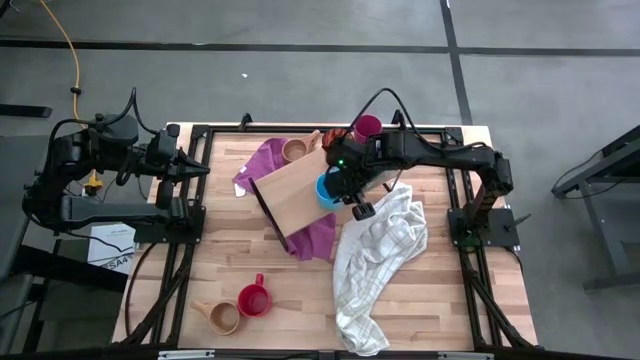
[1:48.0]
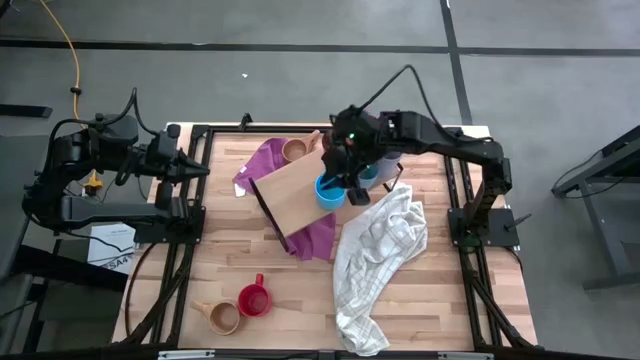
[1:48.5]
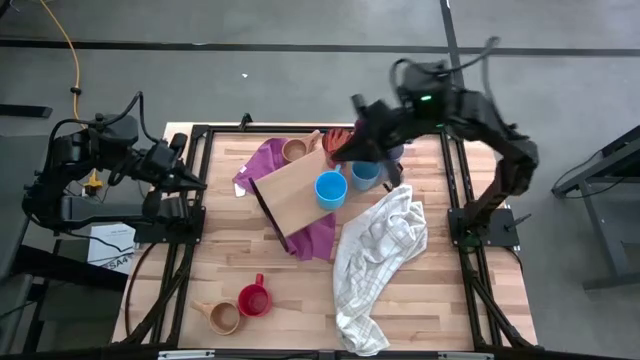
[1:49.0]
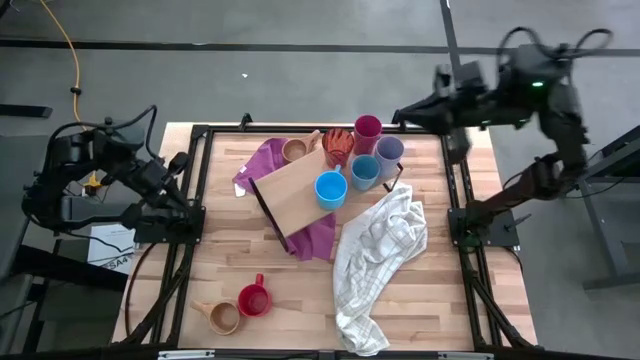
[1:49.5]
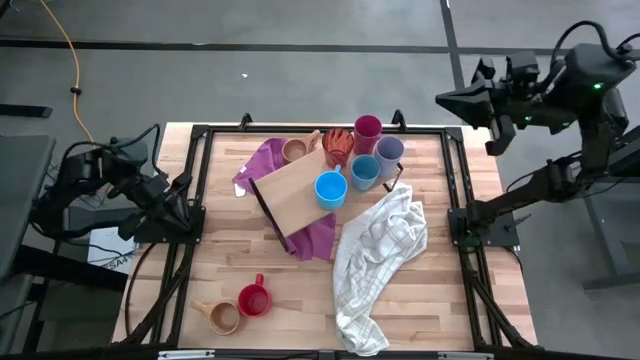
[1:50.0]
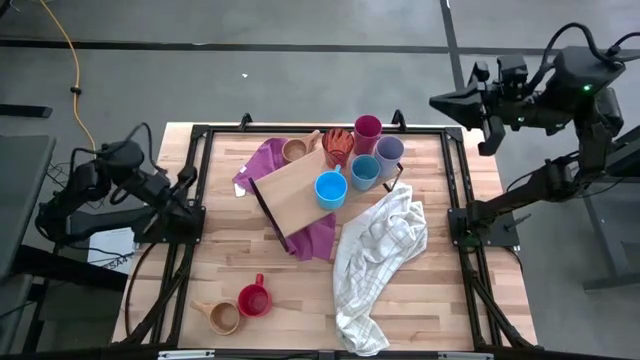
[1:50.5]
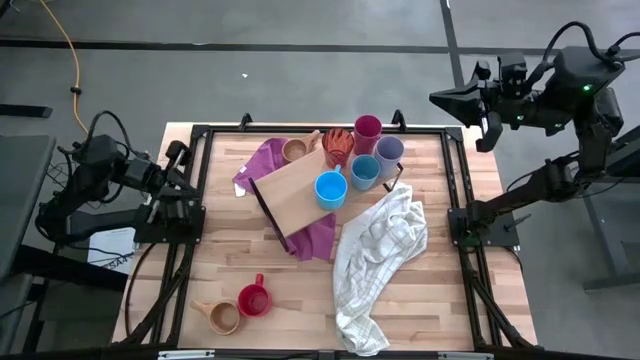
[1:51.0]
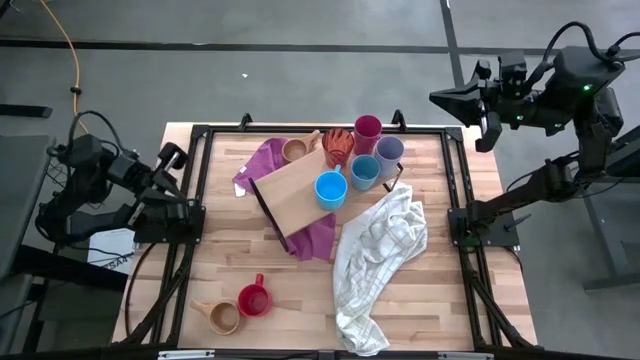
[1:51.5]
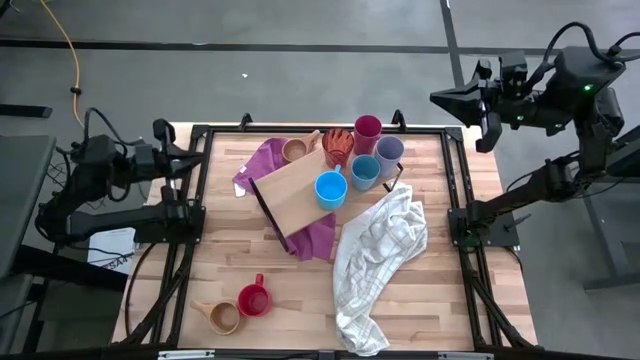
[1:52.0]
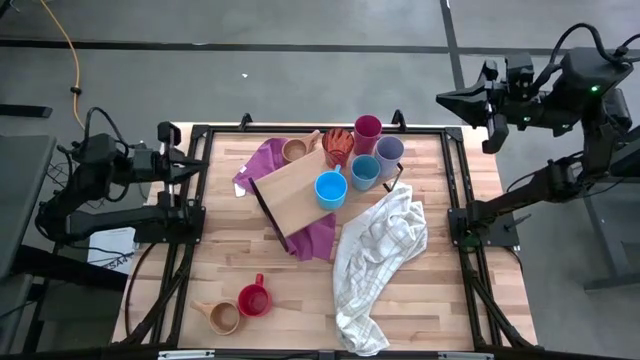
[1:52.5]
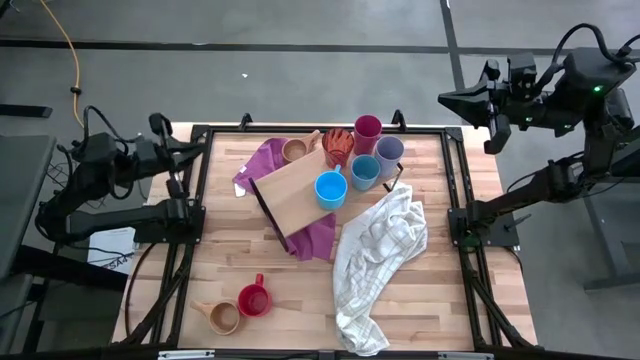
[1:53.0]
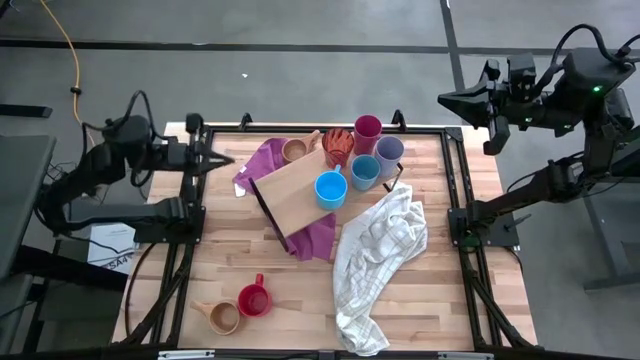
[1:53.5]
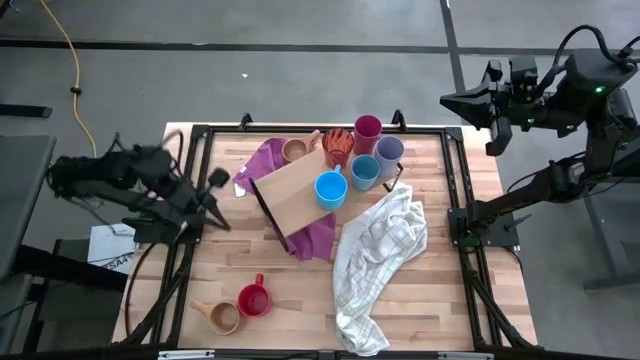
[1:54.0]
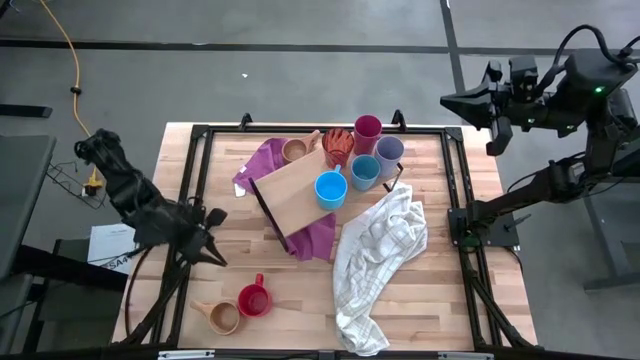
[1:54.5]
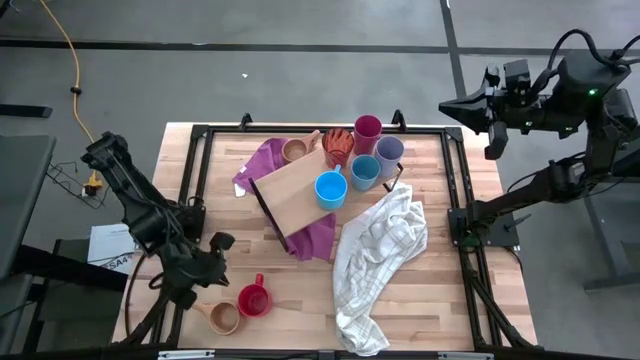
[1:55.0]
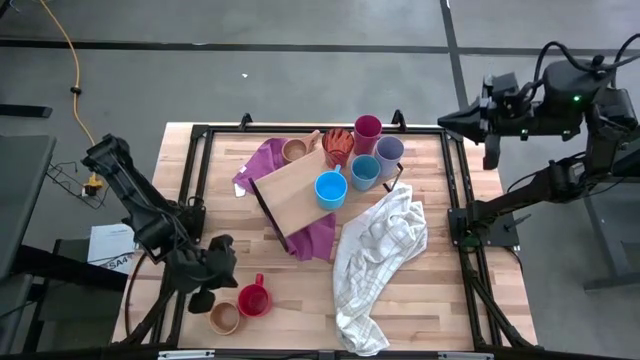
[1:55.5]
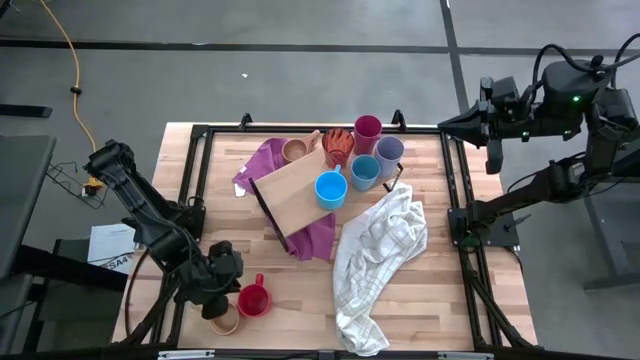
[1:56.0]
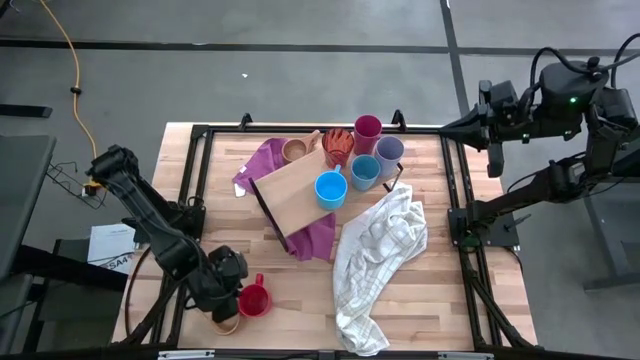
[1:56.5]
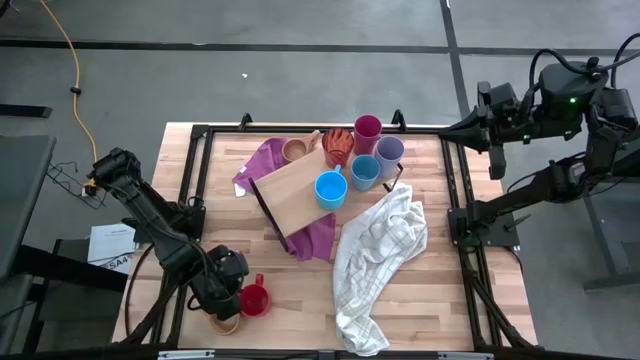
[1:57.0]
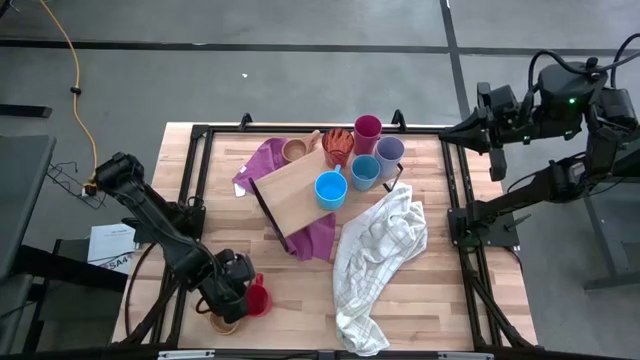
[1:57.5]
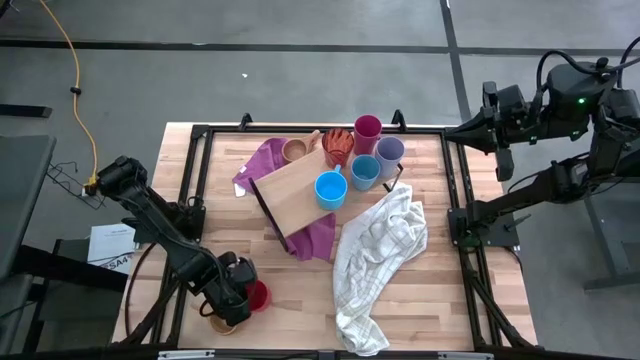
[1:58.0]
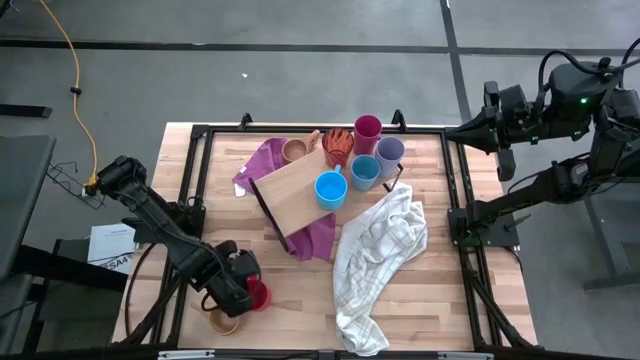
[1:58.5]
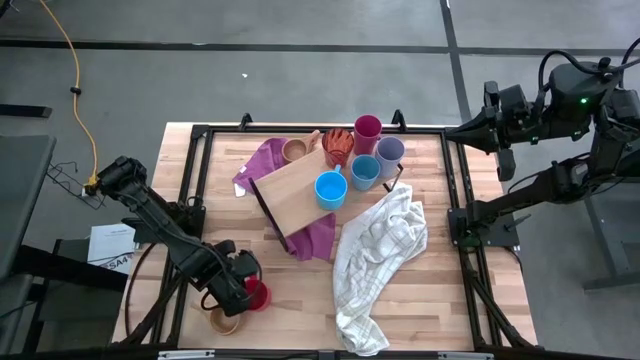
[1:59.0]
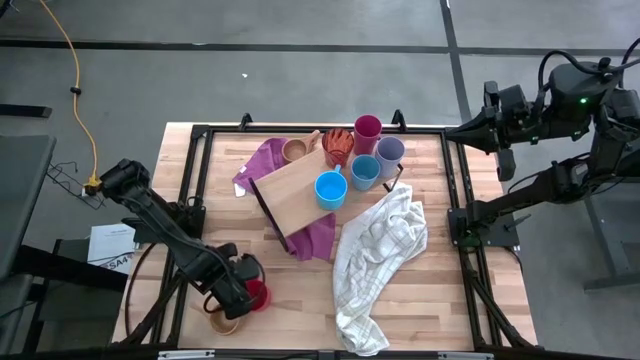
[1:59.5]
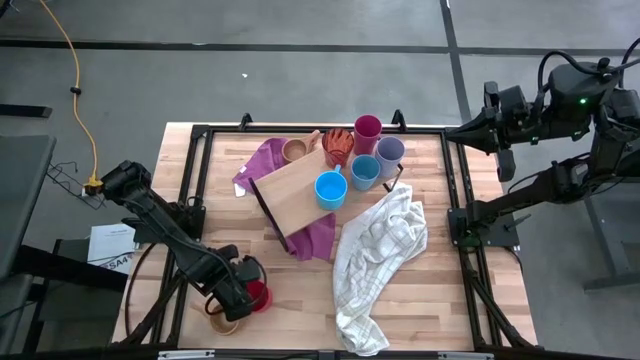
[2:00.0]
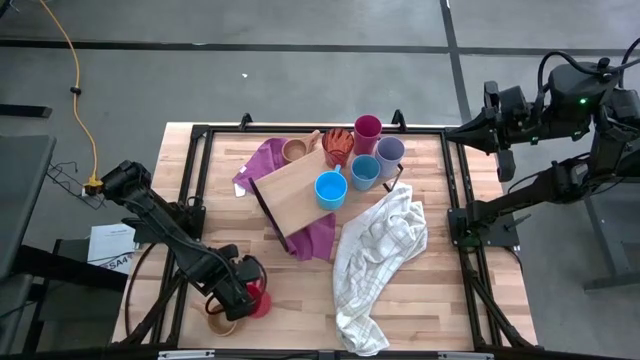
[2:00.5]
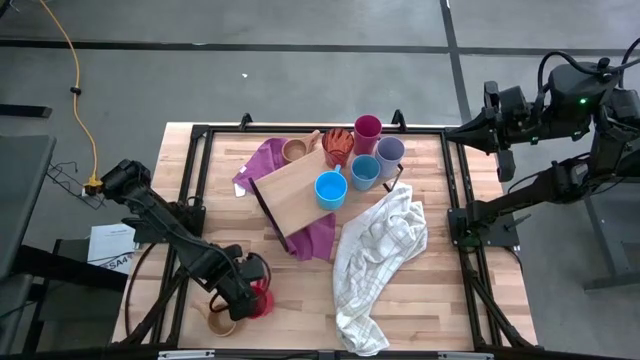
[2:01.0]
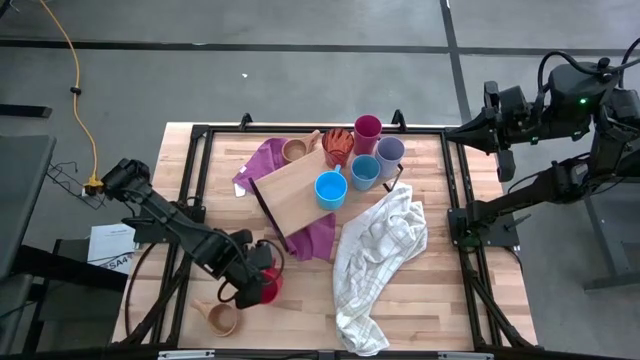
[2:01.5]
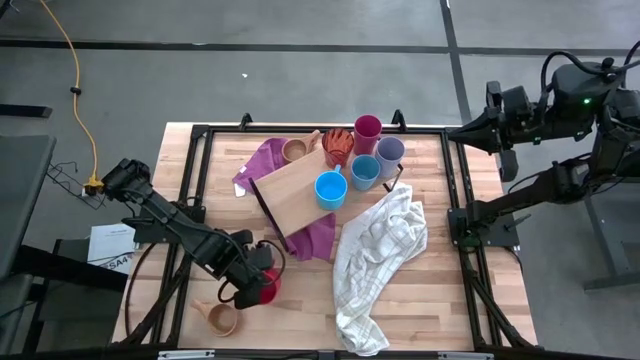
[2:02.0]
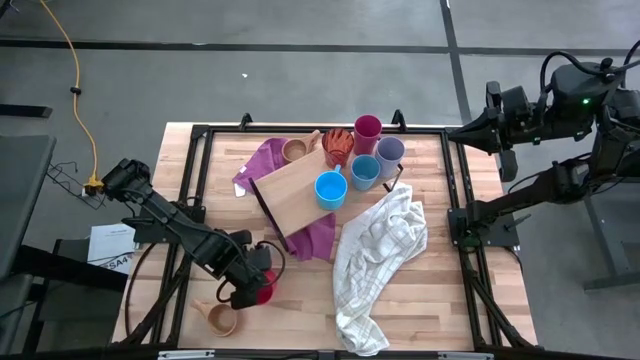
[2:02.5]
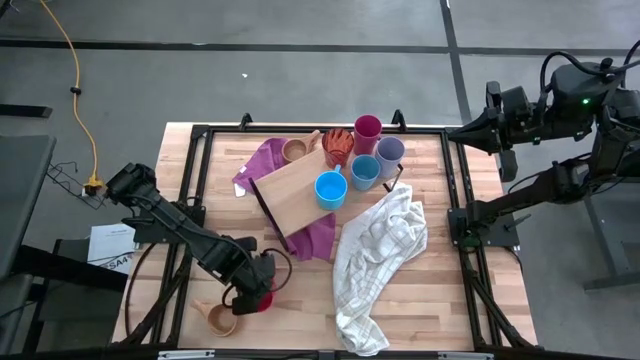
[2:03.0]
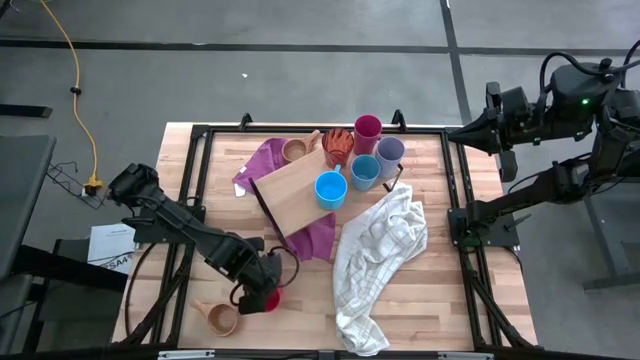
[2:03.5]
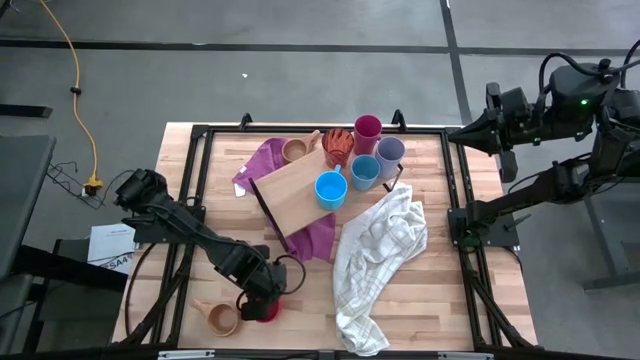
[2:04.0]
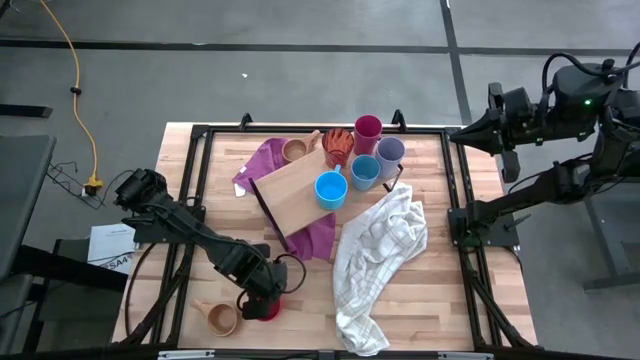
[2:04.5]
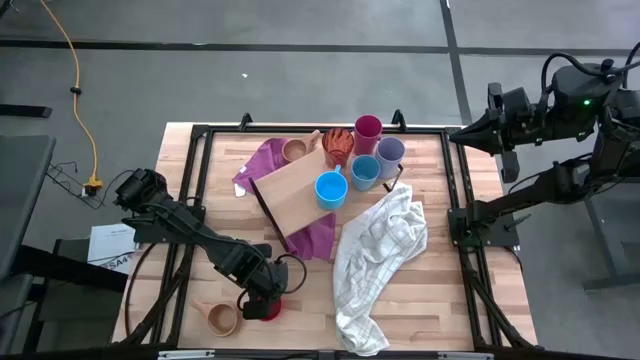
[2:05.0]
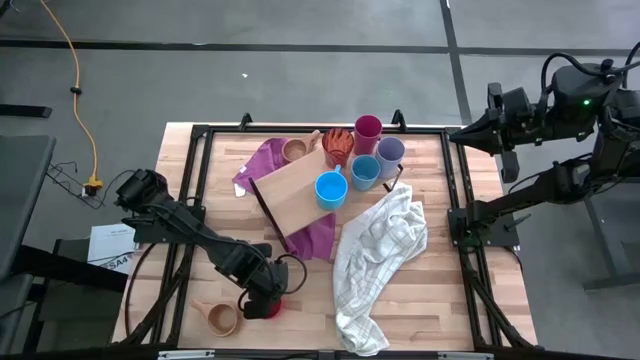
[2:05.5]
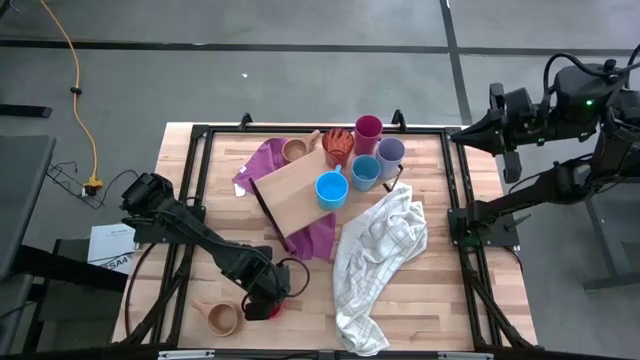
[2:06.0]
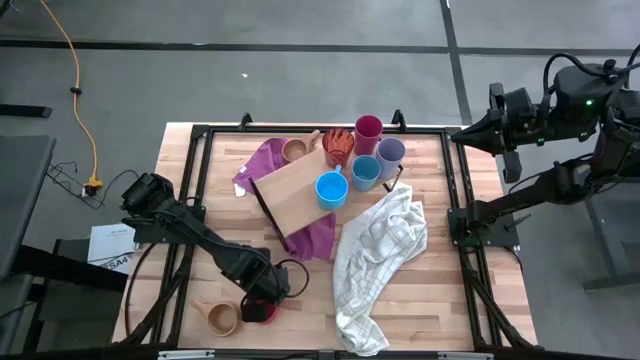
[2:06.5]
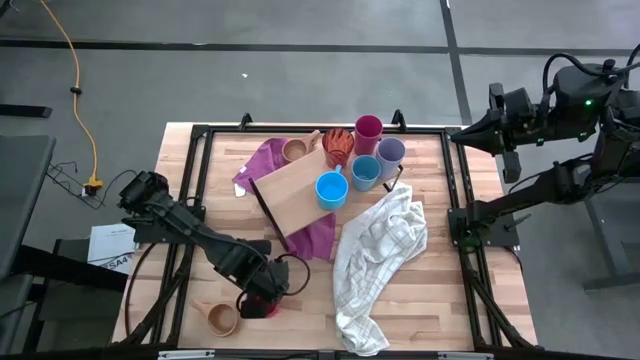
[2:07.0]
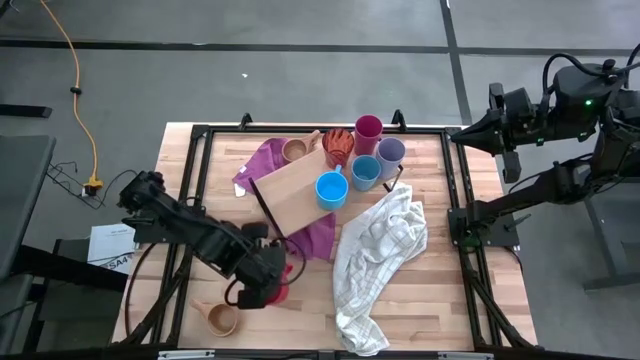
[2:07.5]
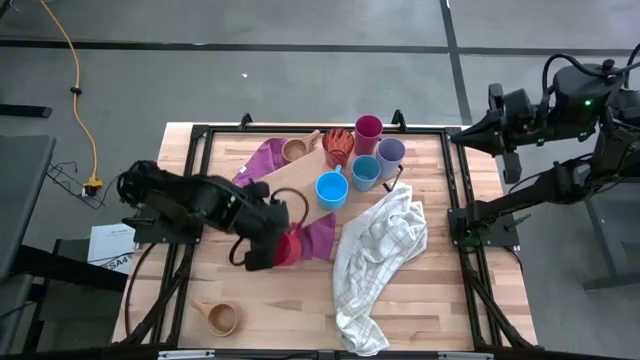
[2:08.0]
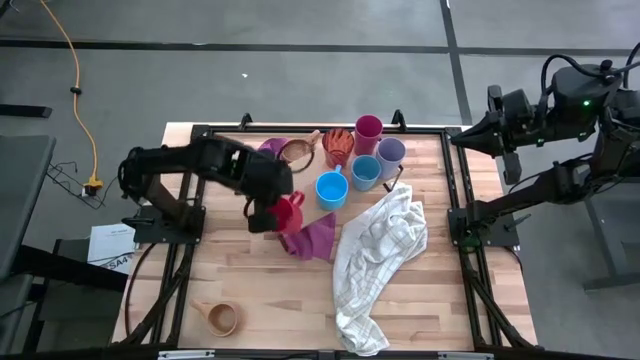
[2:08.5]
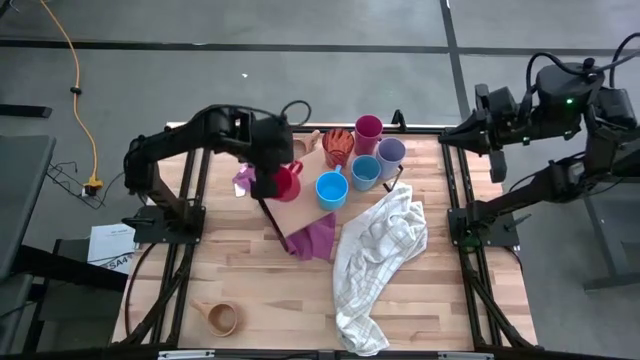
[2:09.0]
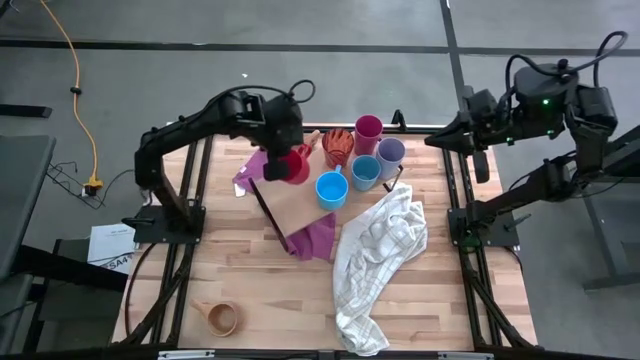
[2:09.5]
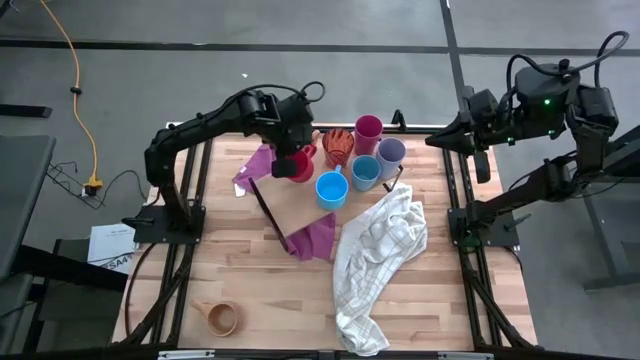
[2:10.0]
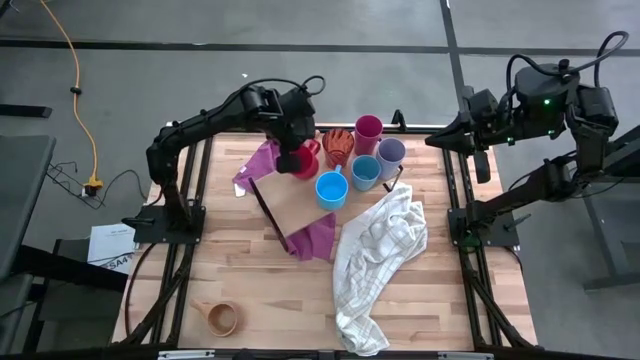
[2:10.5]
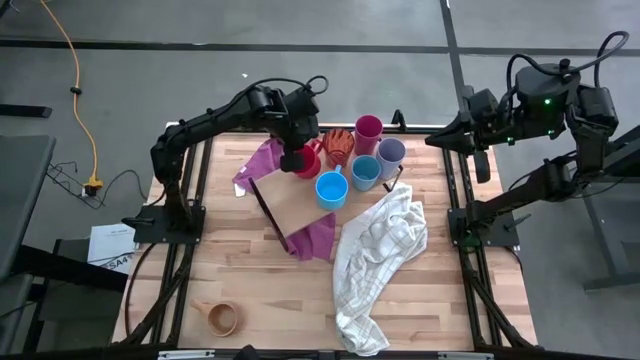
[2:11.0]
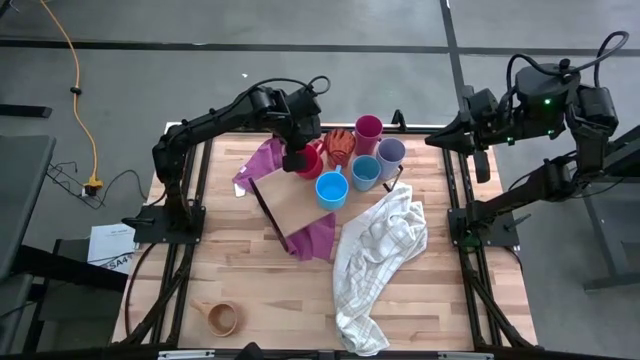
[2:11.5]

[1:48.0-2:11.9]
Task: Stack small to large cups/mugs on shelf
Put the red mug on the shelf
